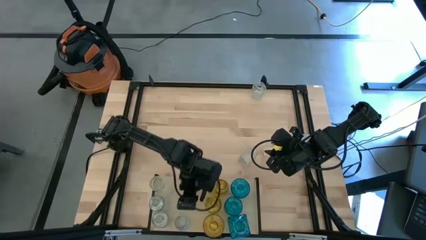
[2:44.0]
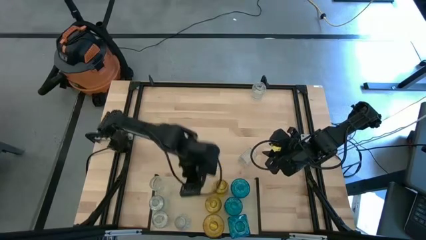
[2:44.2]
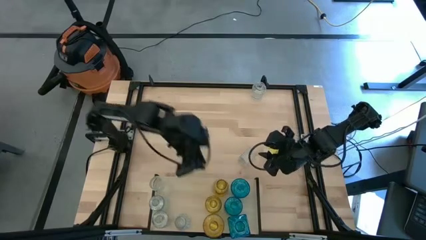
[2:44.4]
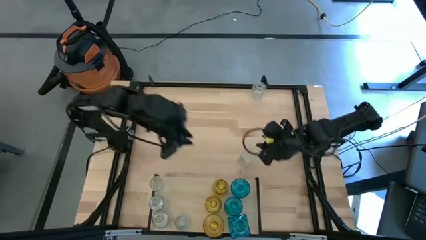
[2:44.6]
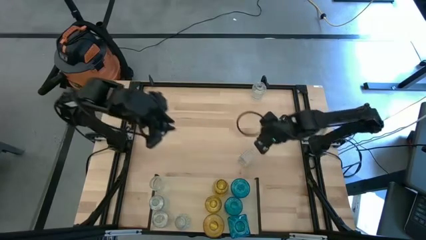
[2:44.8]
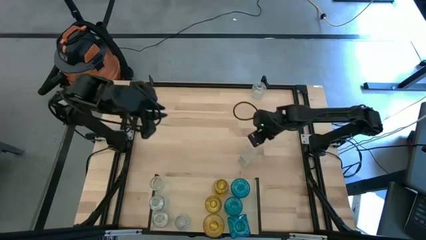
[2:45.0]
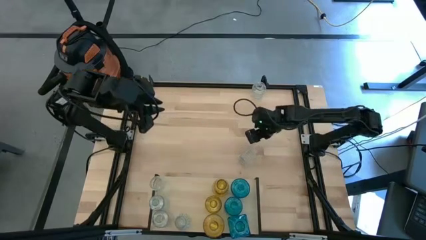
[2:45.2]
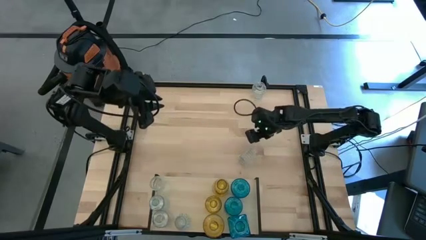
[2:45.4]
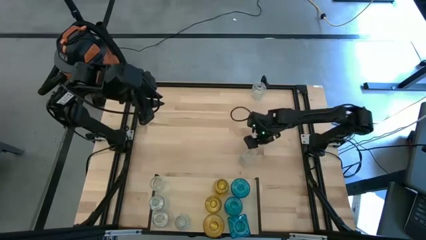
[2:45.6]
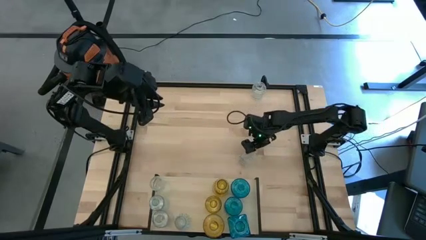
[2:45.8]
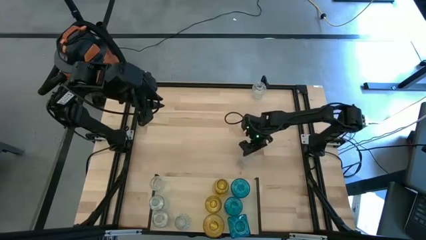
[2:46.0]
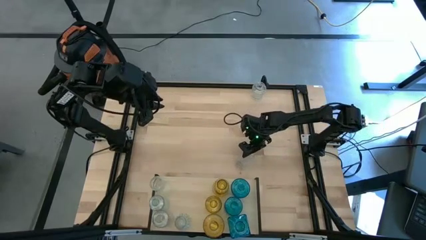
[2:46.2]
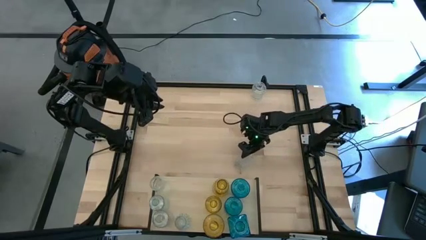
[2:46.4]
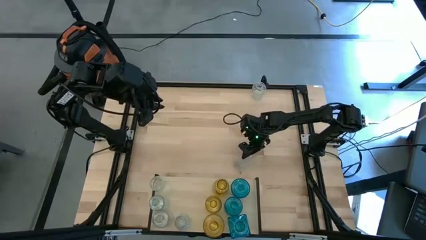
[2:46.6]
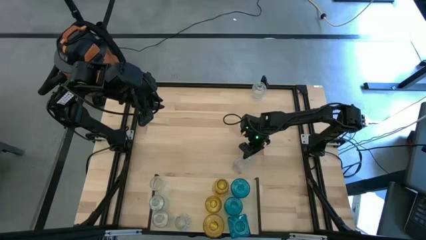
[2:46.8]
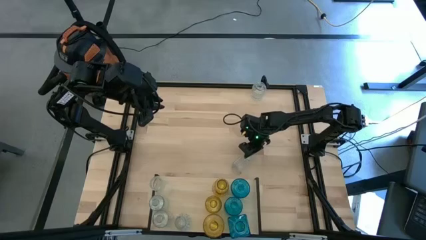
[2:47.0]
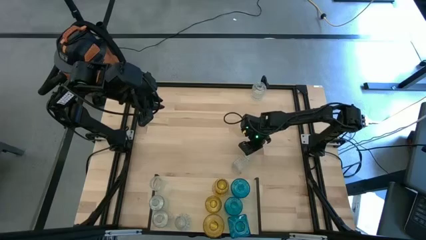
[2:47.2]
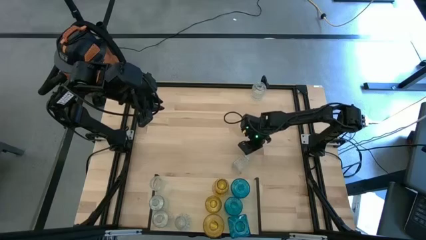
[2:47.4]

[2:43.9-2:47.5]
Task: sort vases onto shelf
Put the transparent vase on the shelf aligned with the other transparent vase

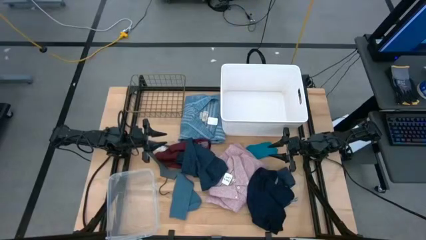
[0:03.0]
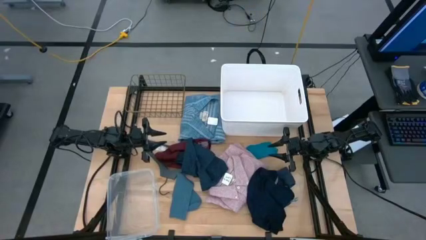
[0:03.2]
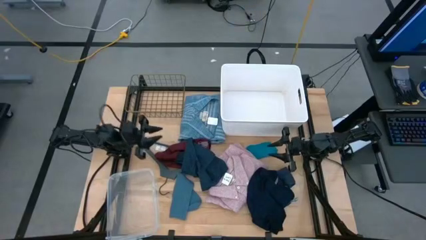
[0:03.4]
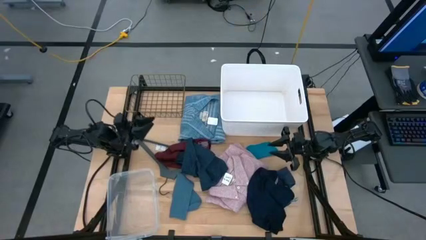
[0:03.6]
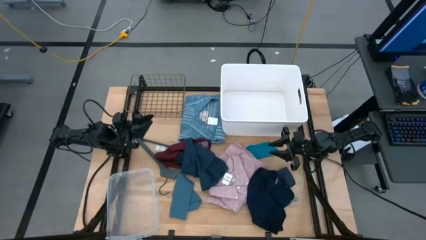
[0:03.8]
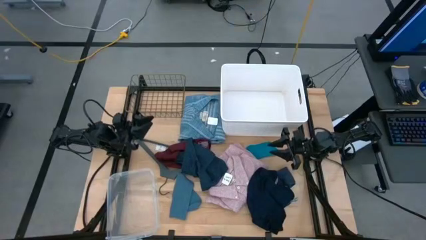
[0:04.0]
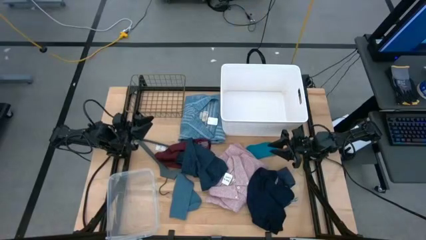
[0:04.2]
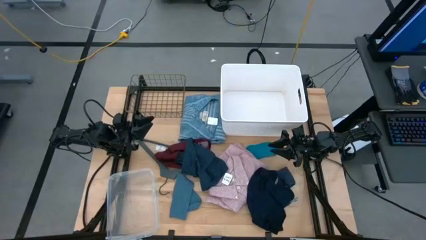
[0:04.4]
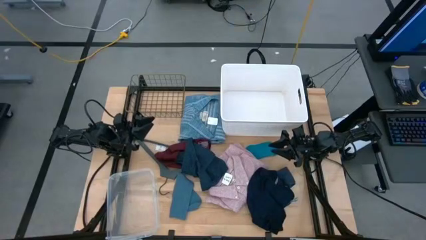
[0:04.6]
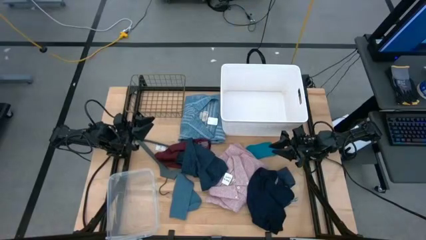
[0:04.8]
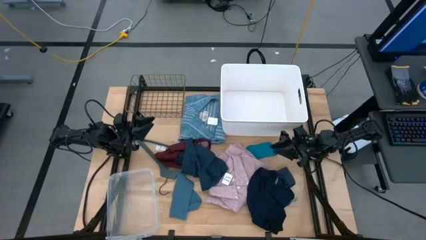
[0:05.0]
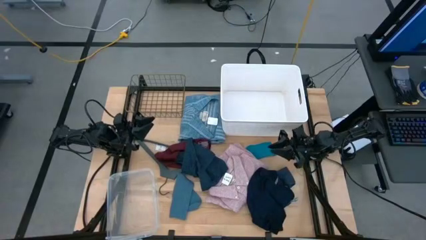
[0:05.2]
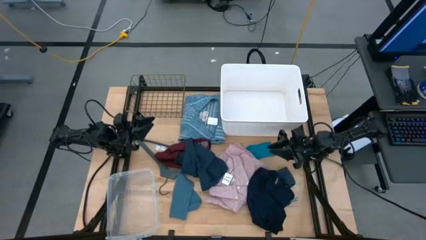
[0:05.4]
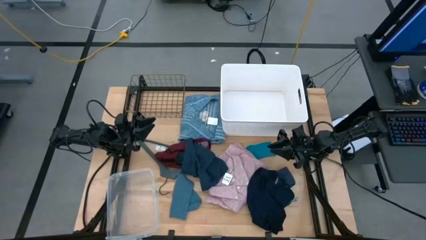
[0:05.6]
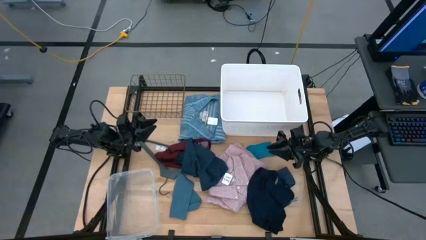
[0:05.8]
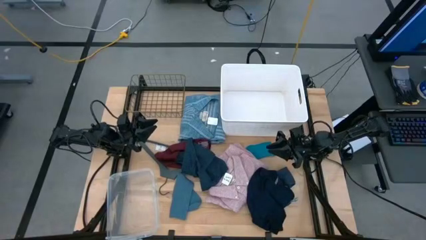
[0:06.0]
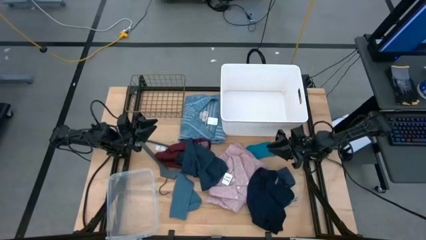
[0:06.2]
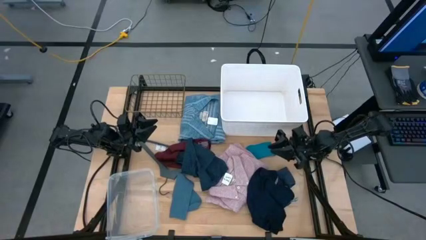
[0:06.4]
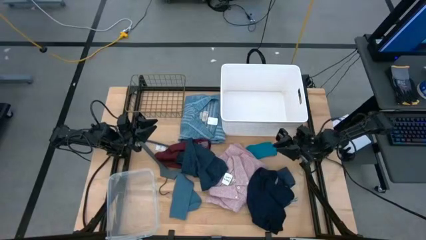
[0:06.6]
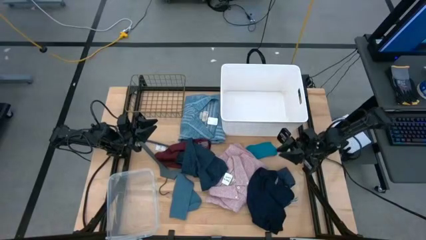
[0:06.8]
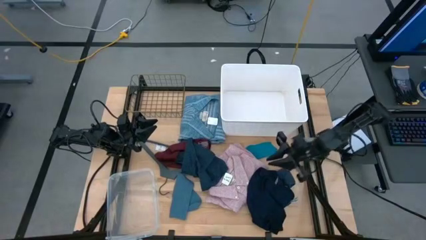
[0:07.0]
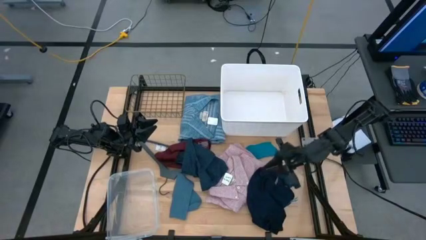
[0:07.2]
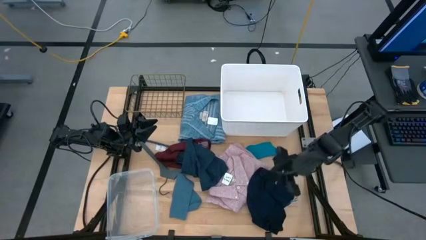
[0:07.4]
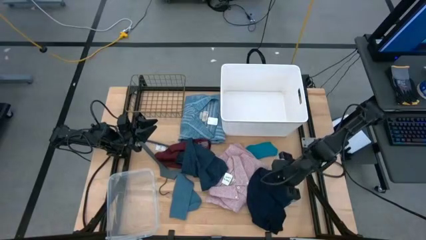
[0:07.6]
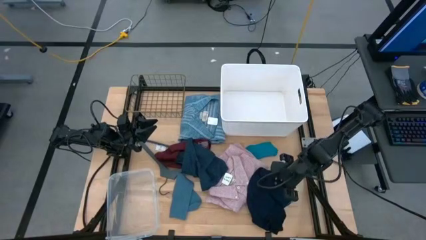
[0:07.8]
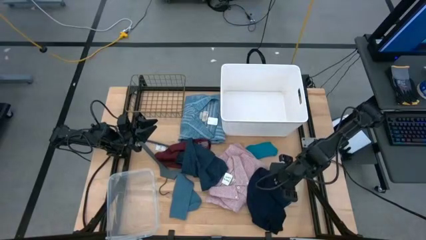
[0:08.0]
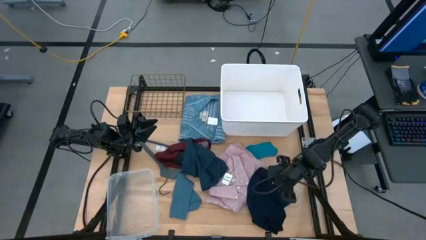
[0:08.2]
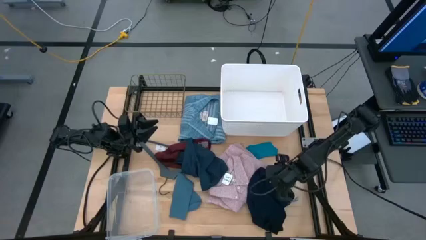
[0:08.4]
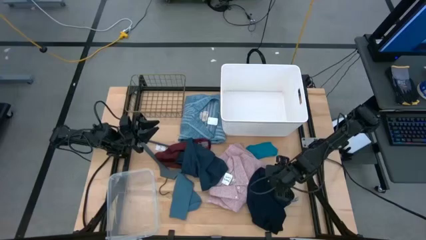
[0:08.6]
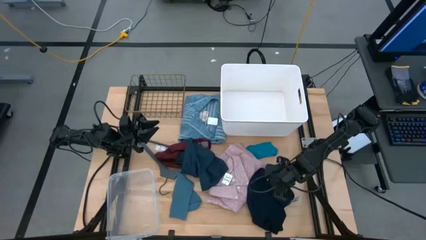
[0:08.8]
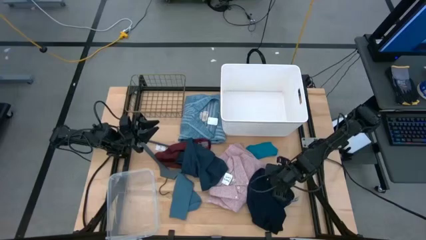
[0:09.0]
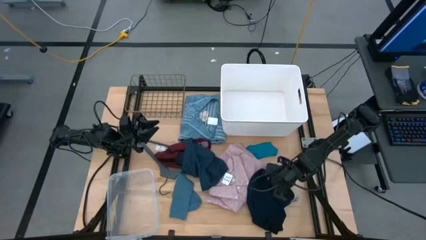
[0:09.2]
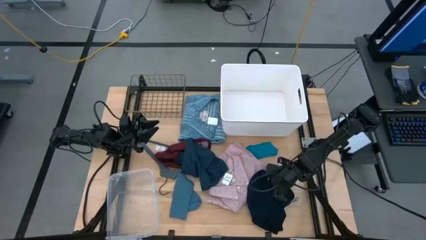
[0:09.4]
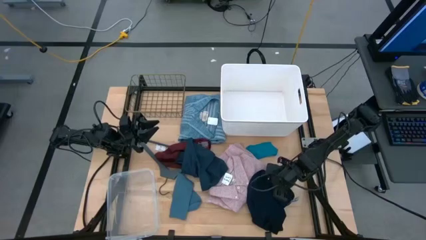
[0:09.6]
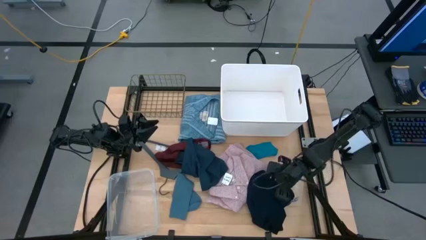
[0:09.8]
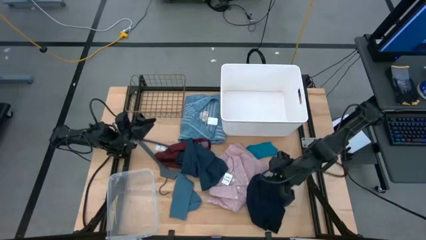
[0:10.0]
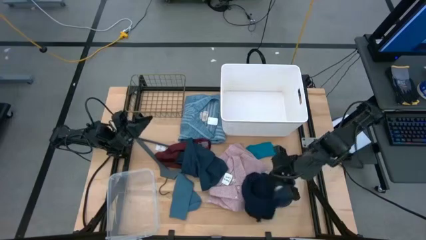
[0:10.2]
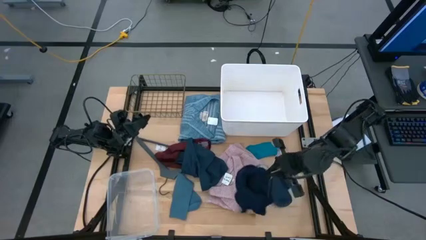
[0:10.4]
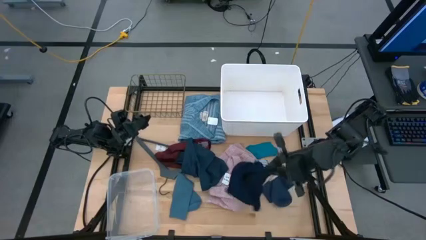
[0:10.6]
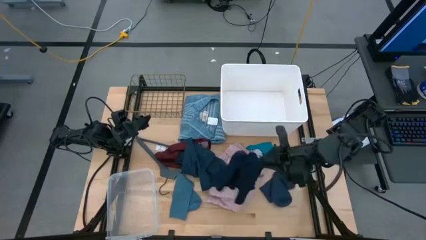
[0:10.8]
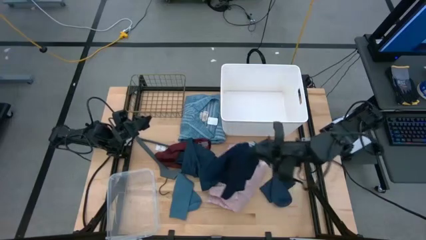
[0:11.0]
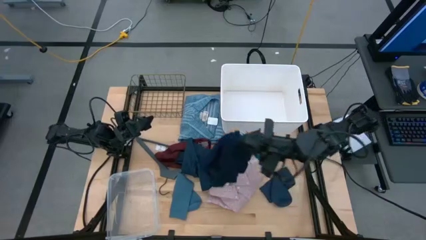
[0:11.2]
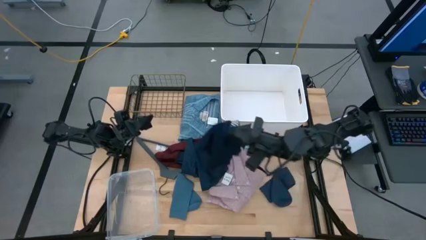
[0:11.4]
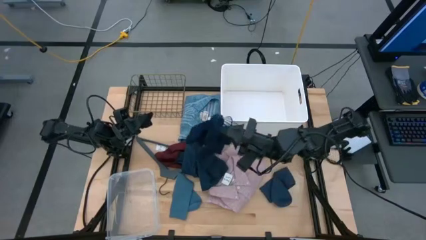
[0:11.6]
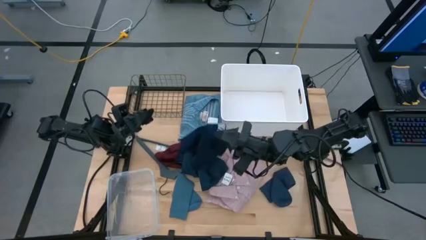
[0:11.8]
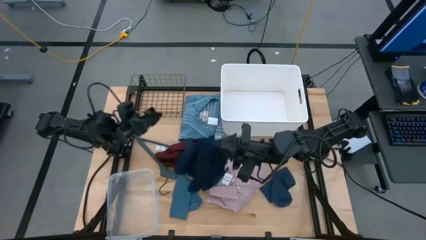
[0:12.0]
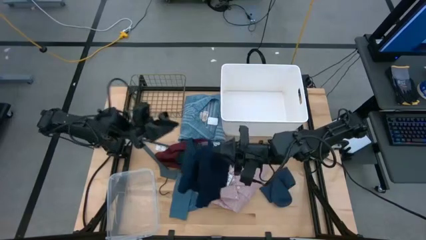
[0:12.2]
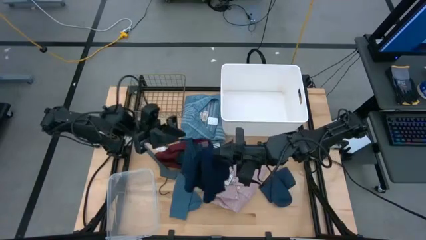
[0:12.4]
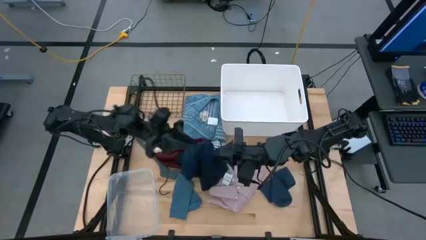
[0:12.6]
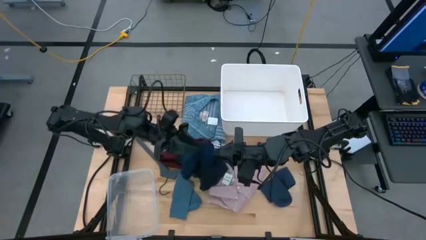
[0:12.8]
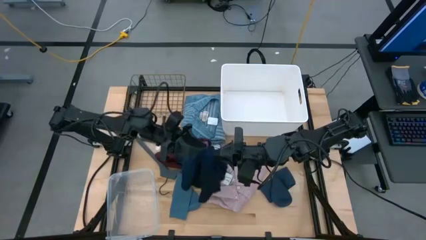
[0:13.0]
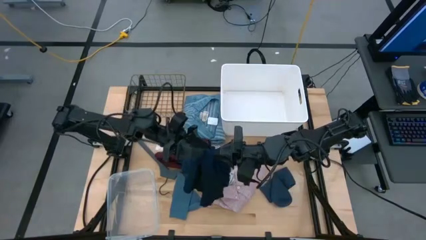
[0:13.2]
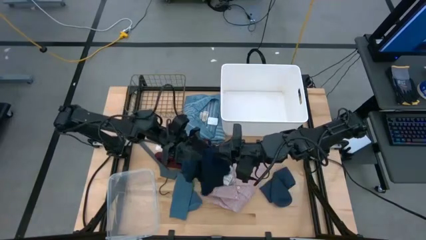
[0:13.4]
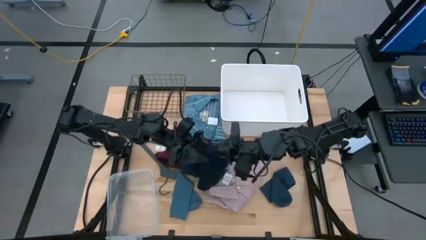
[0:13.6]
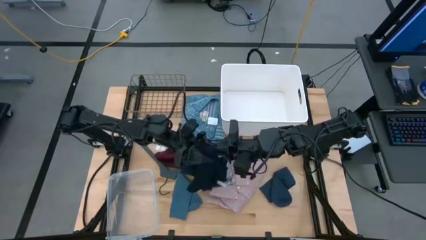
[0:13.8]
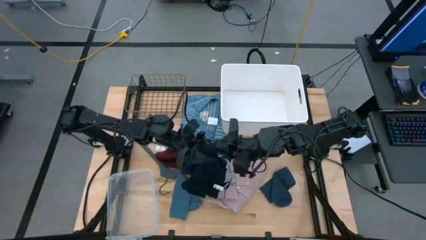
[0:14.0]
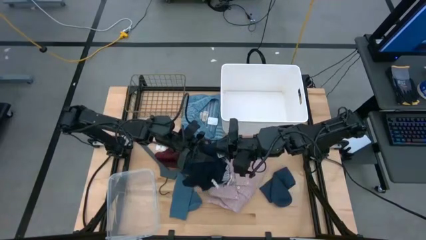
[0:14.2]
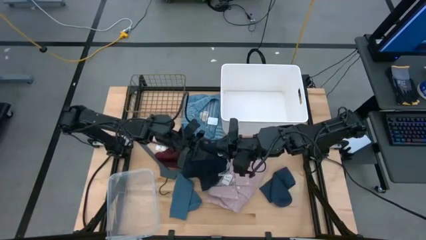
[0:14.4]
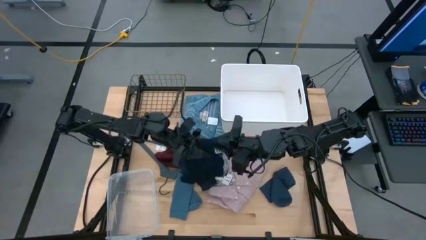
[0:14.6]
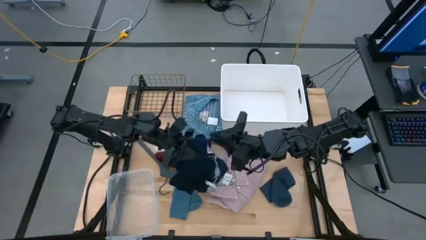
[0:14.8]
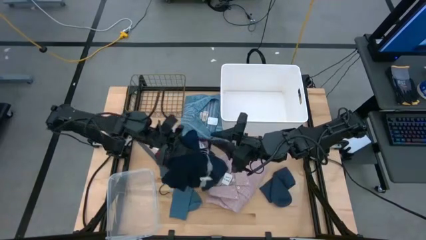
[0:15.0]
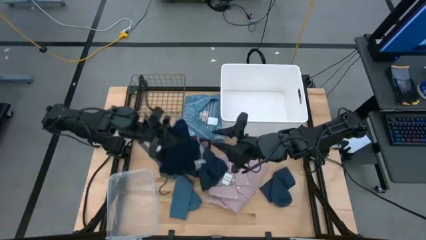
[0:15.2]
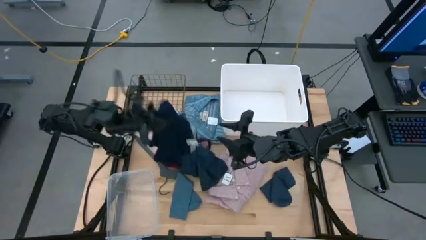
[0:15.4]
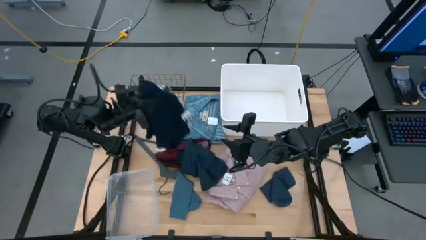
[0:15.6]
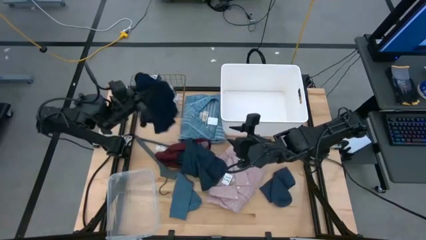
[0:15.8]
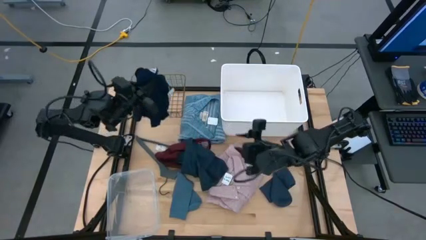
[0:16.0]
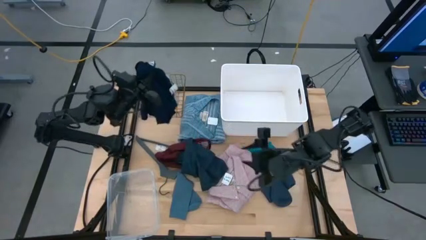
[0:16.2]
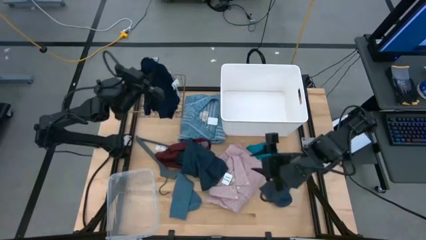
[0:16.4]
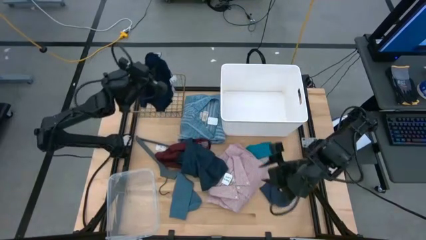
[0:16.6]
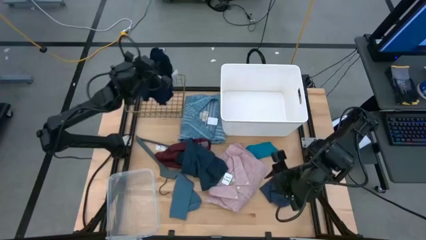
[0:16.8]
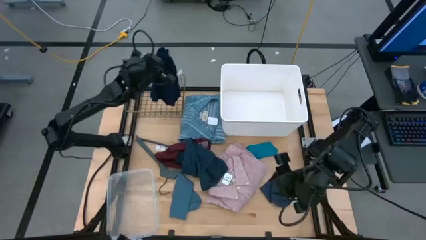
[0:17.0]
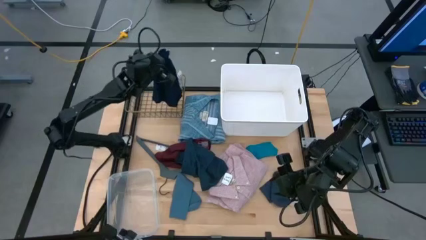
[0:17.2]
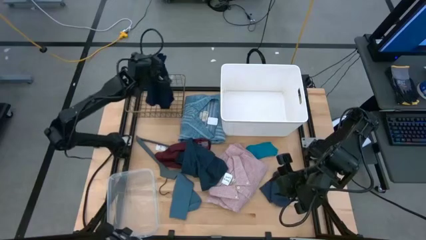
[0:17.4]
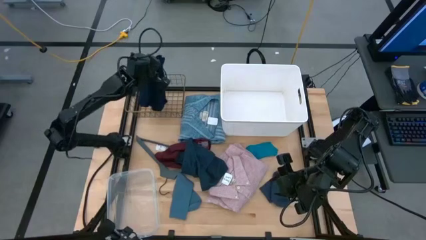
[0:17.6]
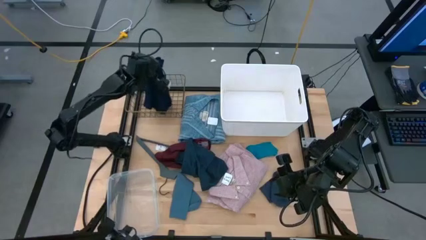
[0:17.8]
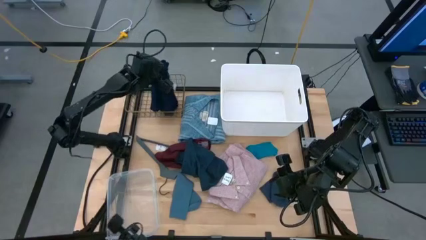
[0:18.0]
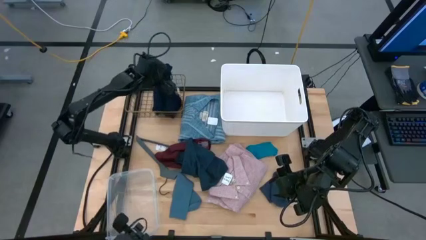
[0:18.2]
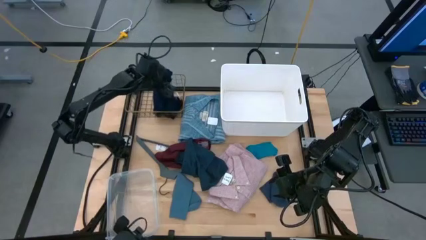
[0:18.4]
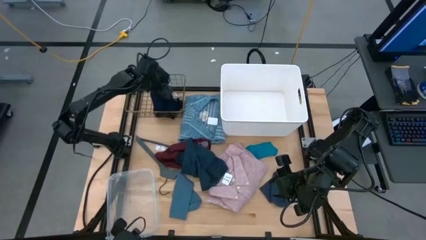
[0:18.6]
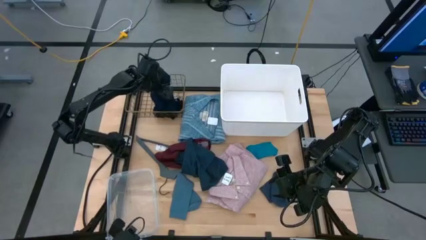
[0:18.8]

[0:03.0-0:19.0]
Task: Pick & Place Cloths
Put the blue underwear into the gold wire basket
